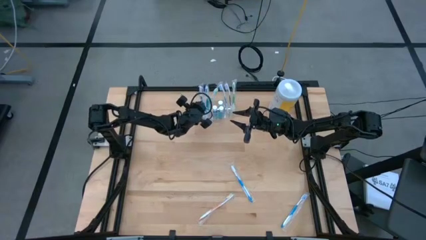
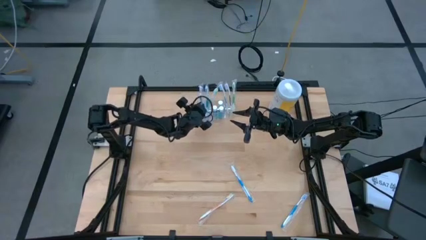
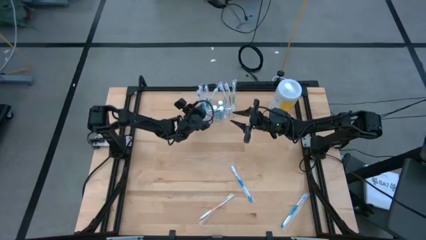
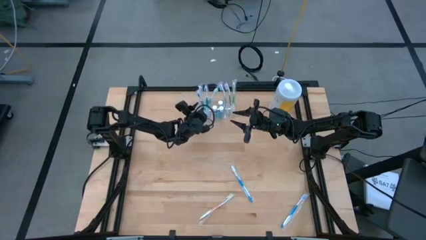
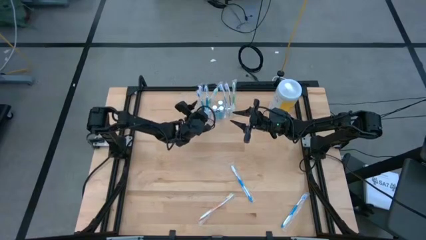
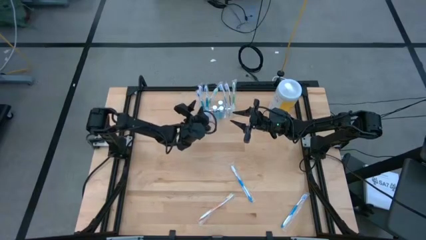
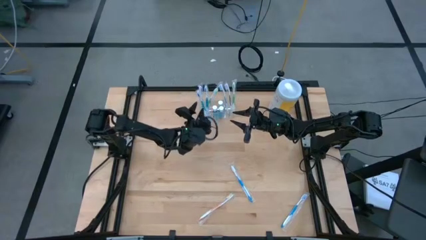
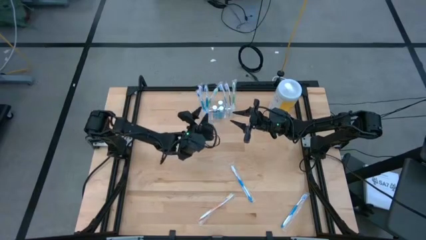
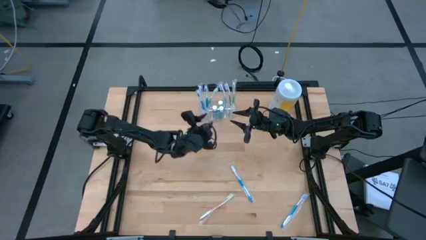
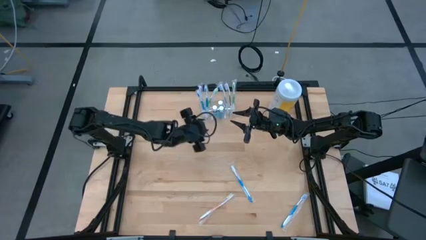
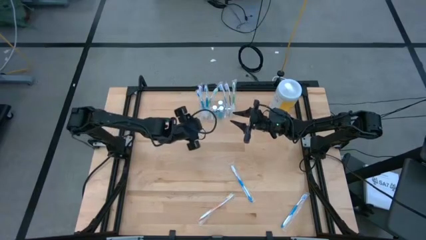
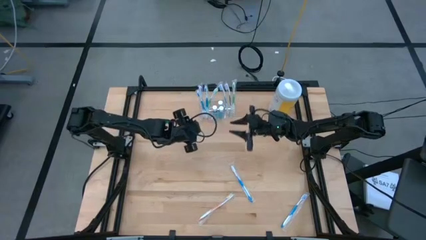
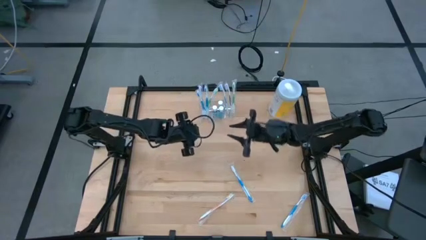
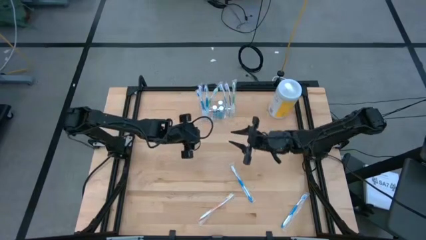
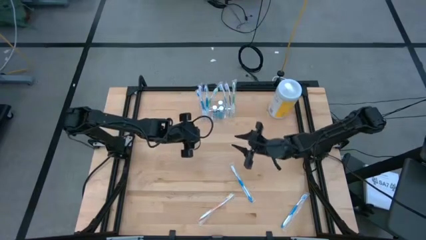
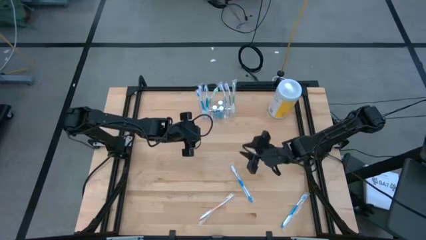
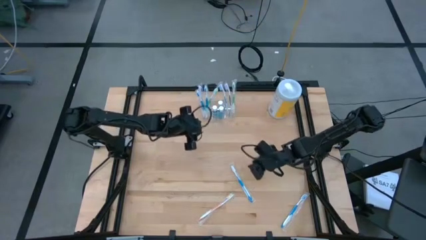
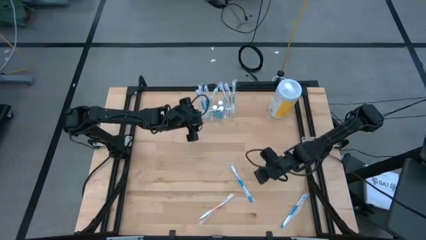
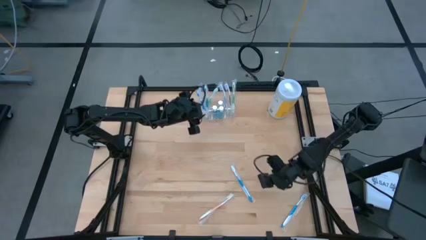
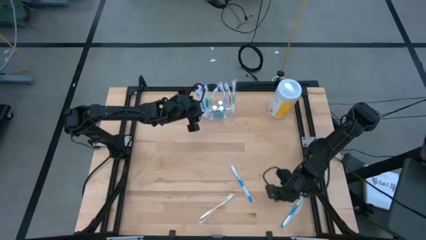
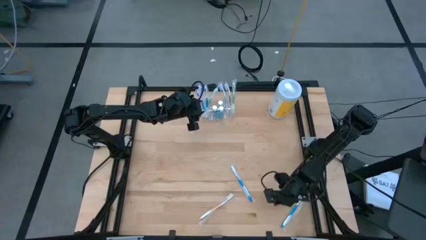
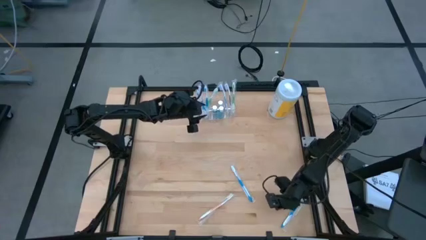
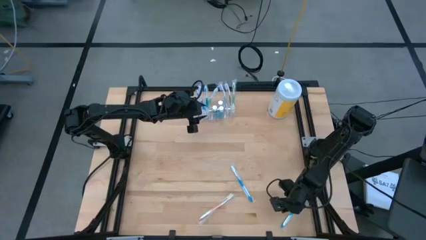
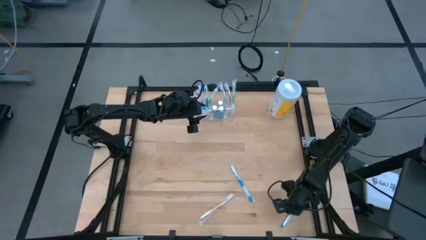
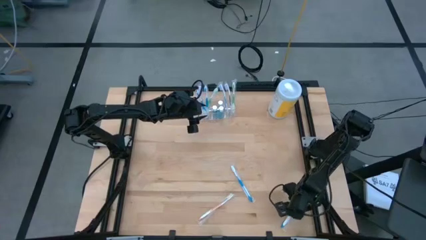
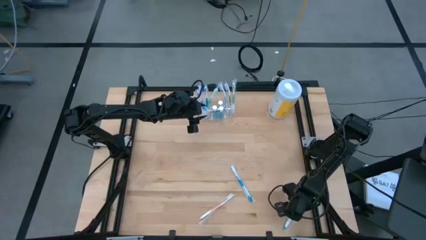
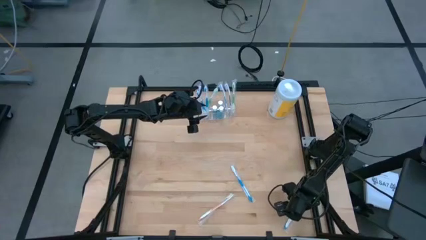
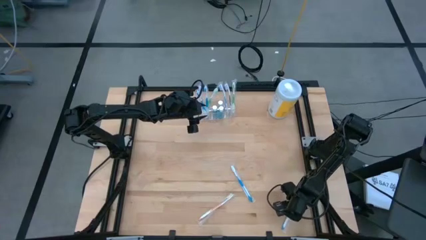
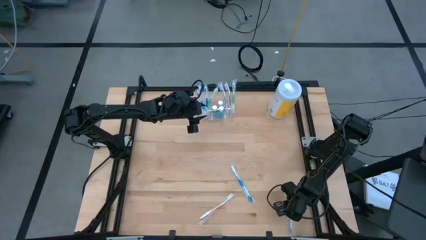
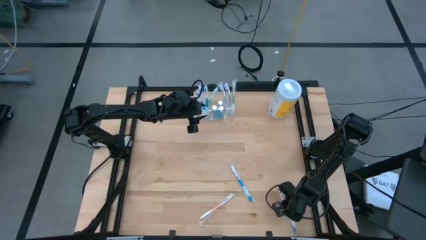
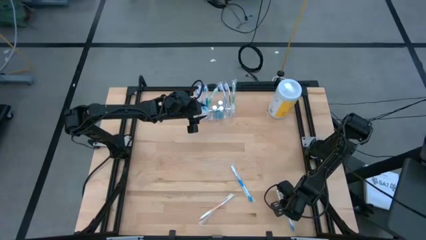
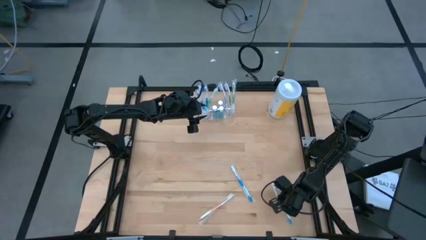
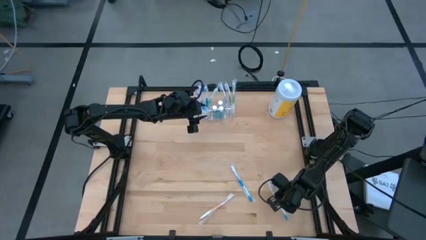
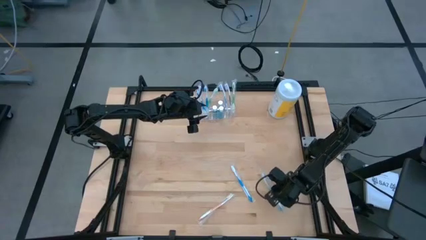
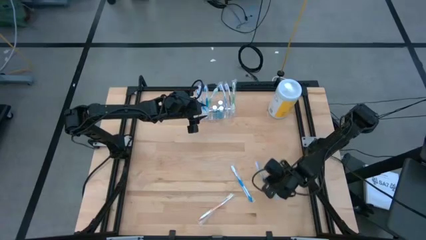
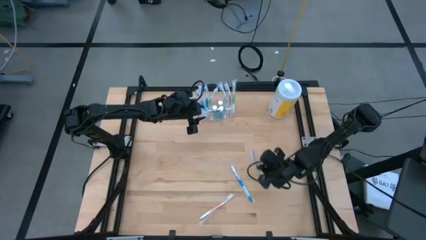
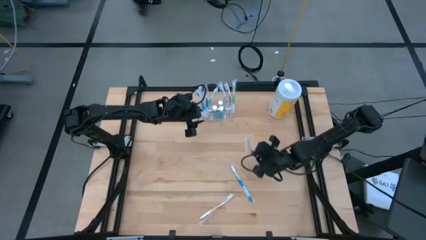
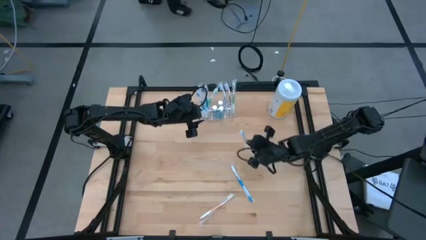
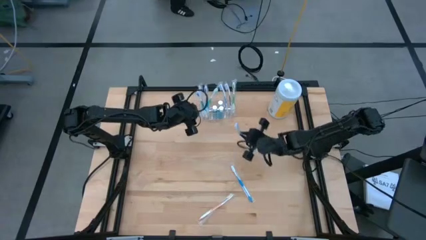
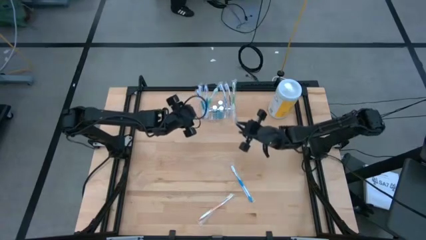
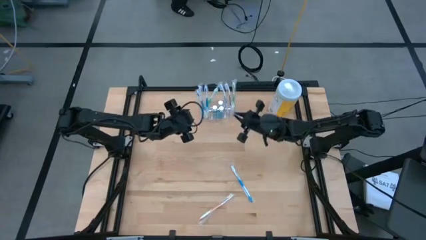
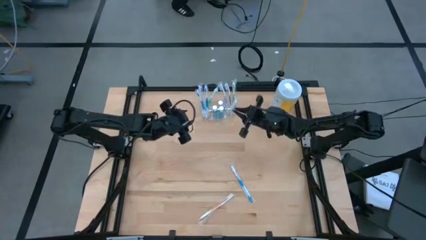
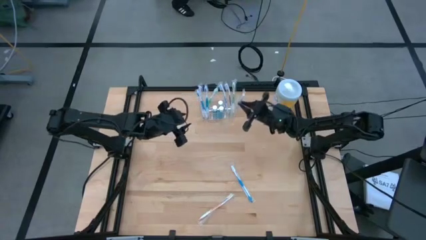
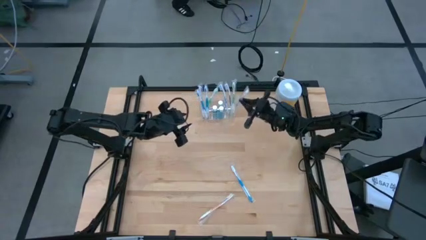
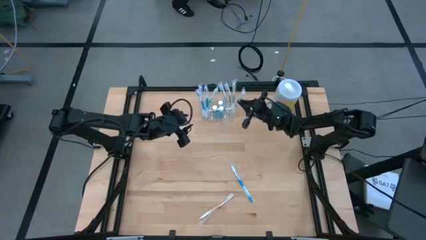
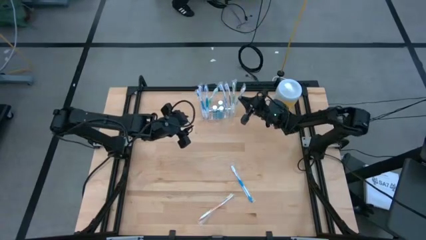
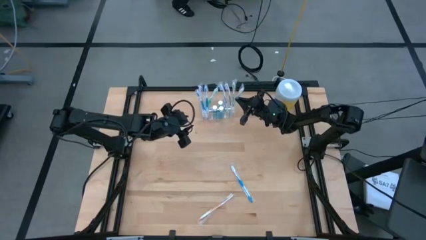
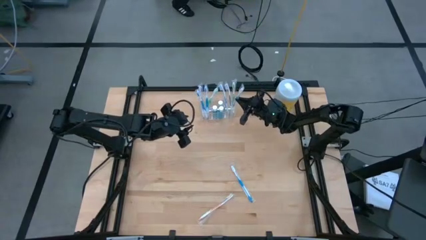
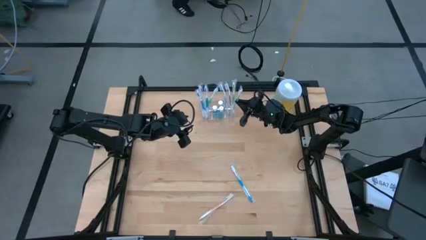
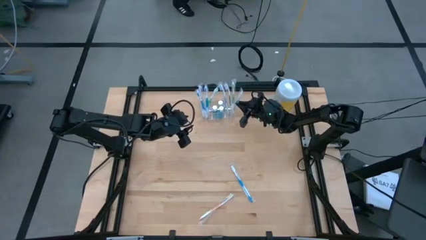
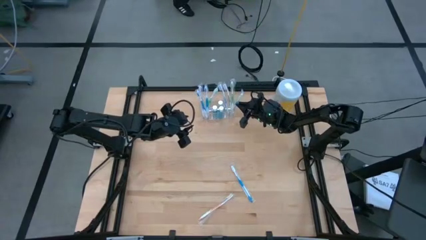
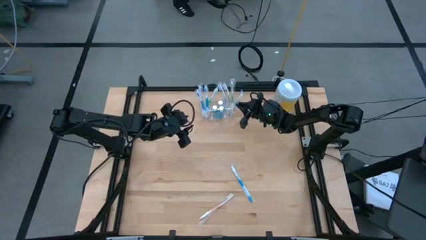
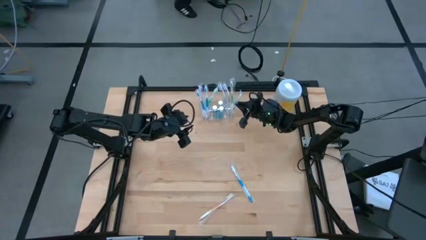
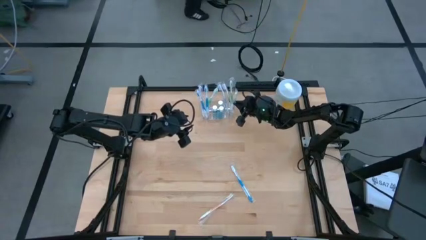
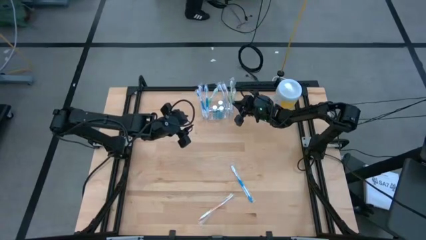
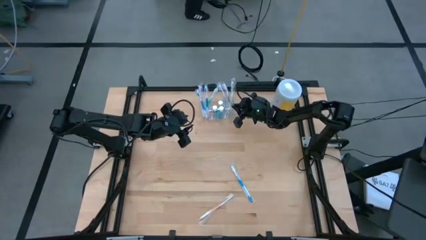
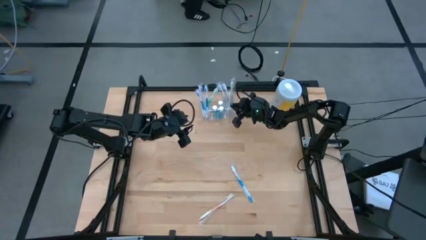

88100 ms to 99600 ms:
Task: Pick & Place toothbrushing station
Put the blue toothbrush into the transparent organizer

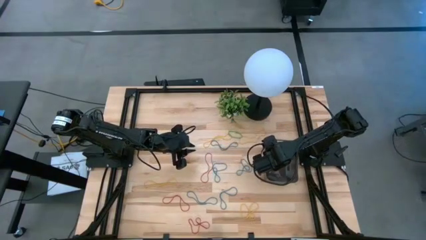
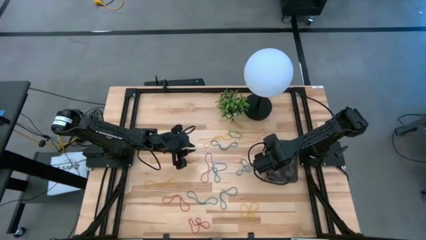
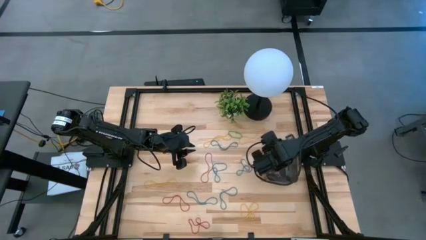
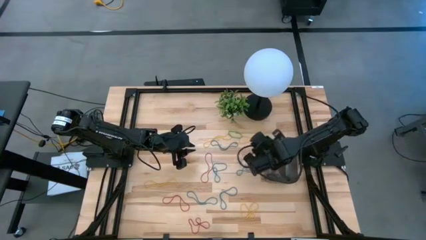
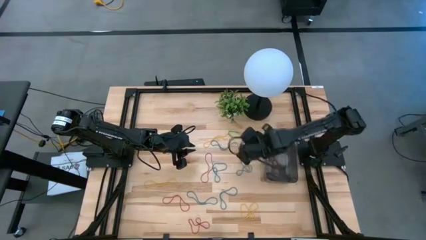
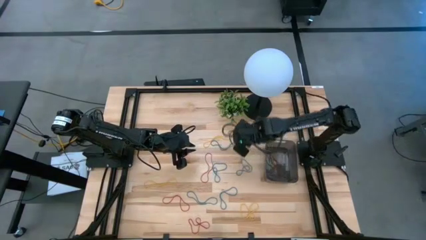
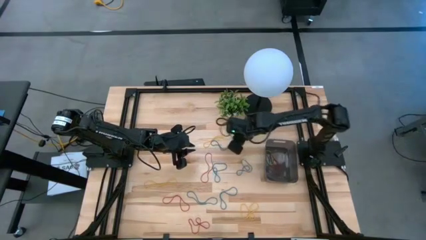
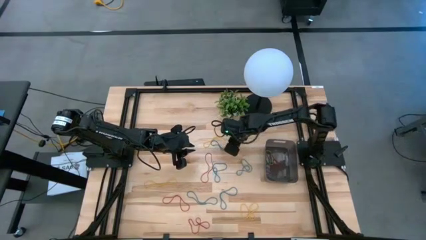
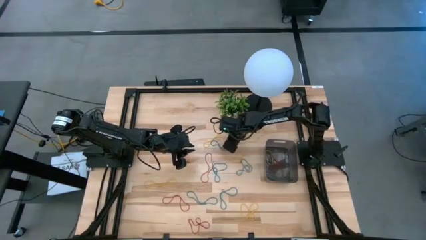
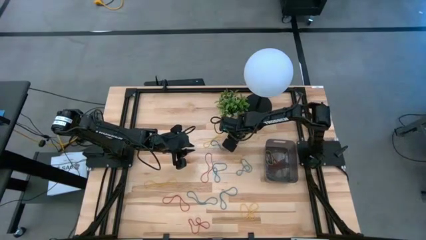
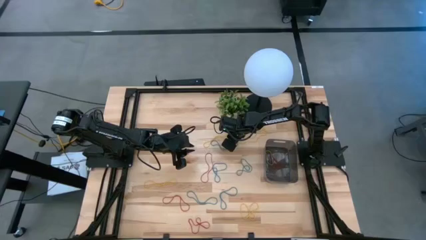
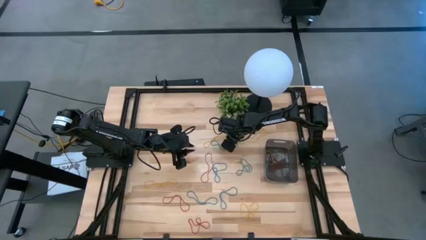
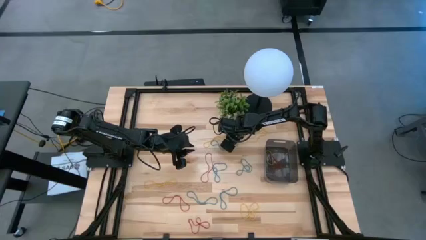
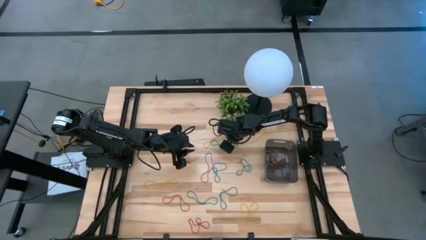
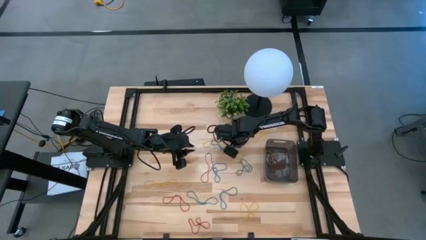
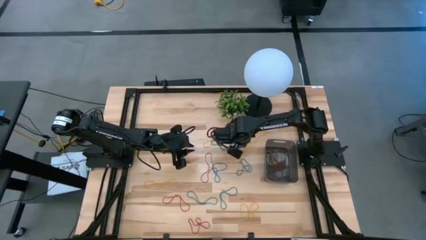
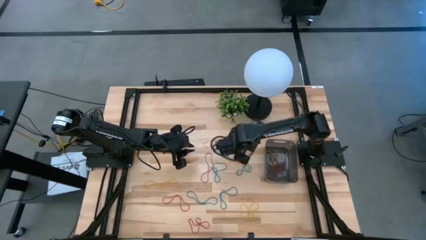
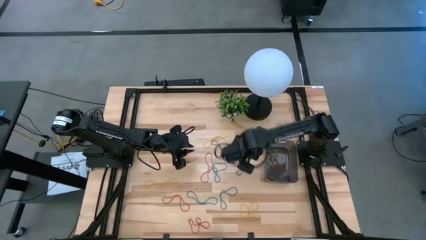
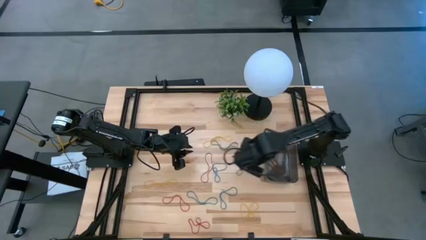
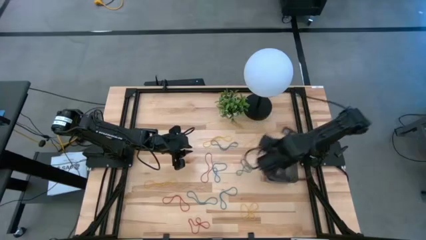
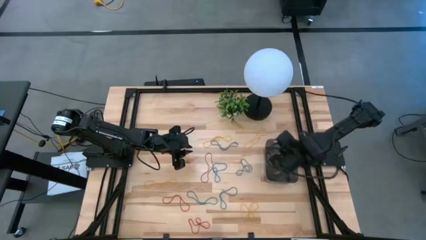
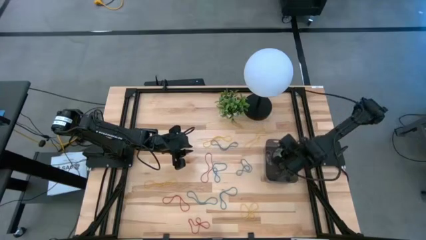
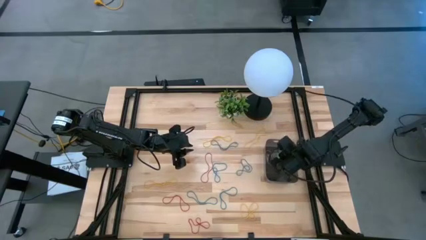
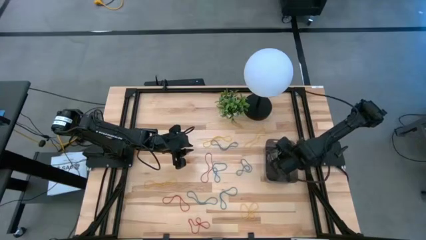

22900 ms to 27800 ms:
Task: Pick and place items into bin
Put the green rubber band into the black transparent bin
